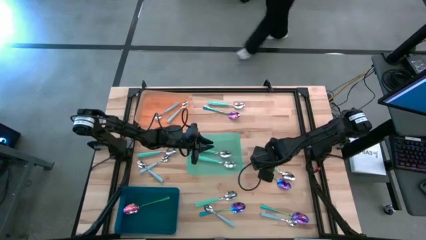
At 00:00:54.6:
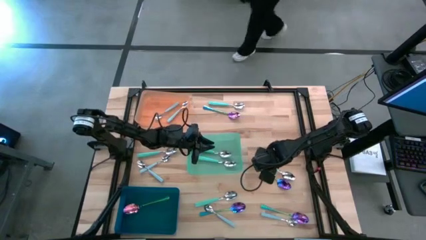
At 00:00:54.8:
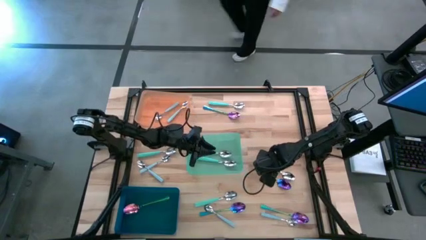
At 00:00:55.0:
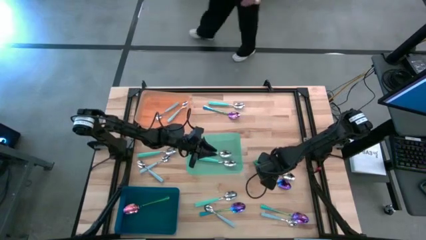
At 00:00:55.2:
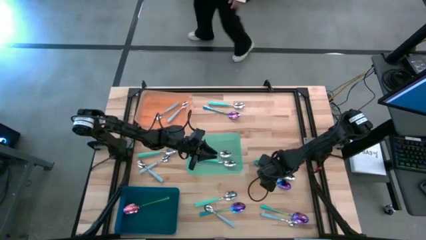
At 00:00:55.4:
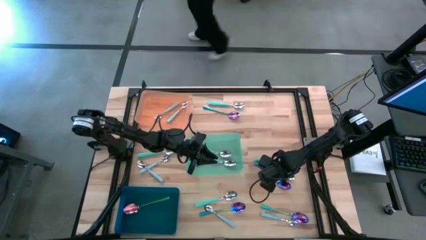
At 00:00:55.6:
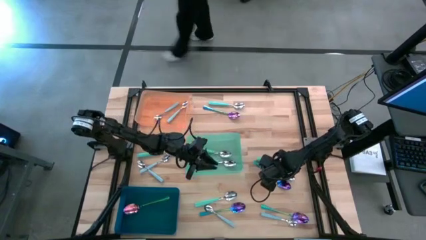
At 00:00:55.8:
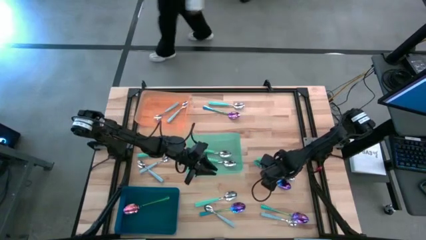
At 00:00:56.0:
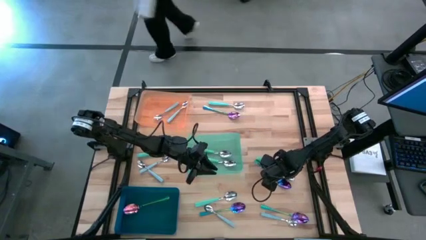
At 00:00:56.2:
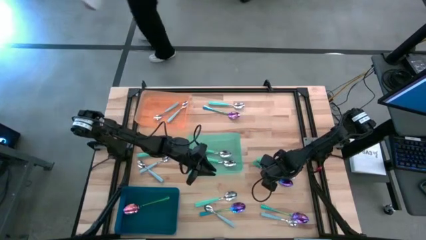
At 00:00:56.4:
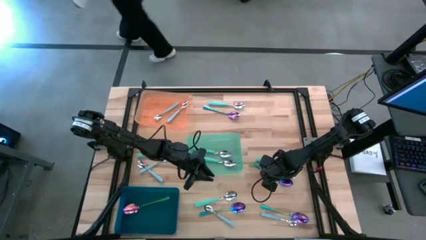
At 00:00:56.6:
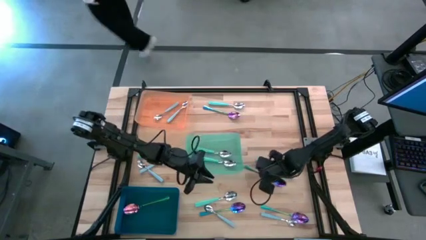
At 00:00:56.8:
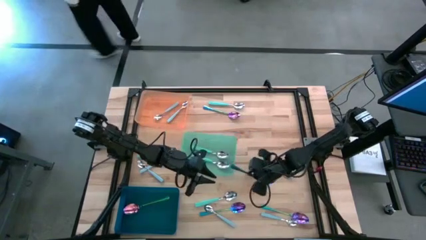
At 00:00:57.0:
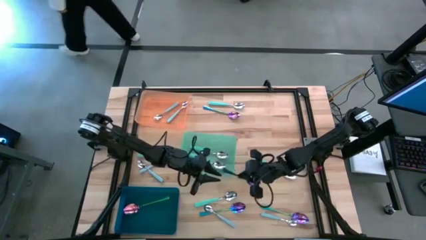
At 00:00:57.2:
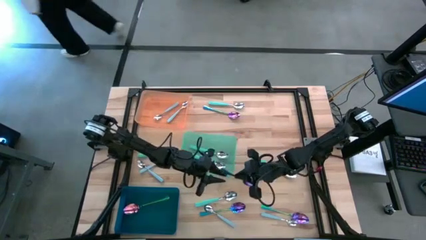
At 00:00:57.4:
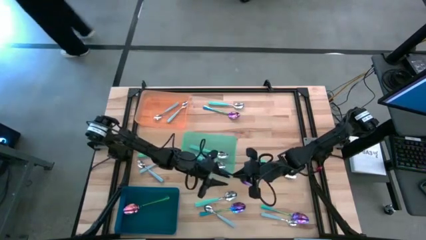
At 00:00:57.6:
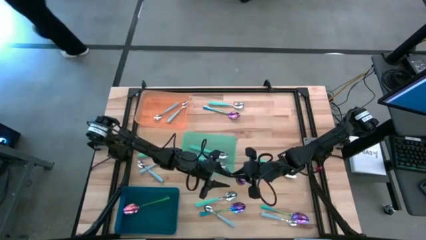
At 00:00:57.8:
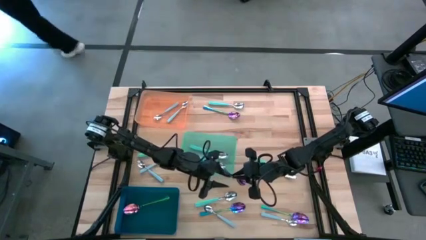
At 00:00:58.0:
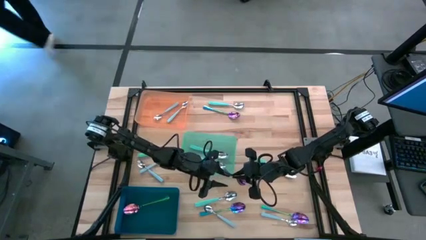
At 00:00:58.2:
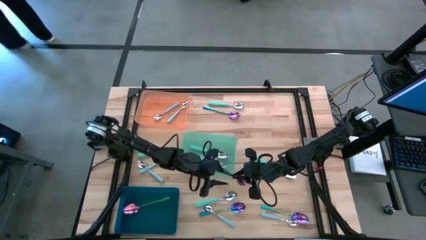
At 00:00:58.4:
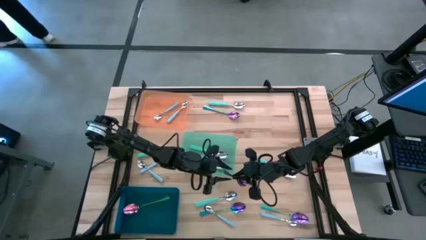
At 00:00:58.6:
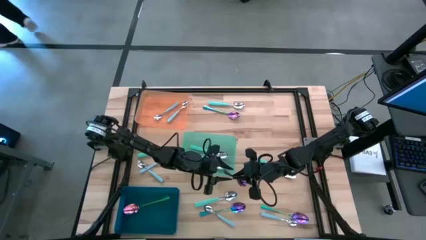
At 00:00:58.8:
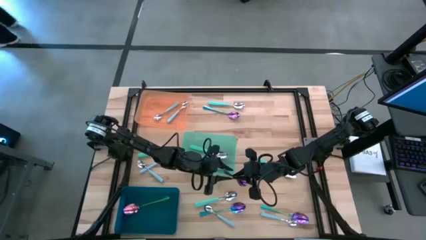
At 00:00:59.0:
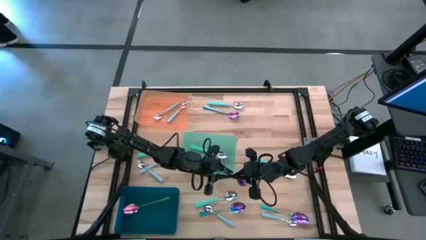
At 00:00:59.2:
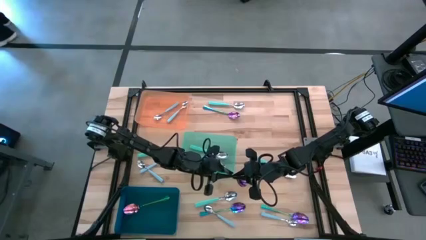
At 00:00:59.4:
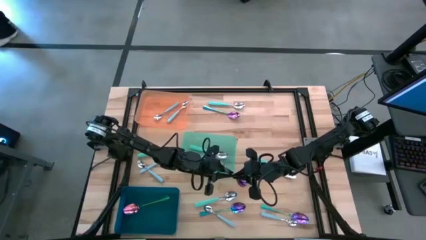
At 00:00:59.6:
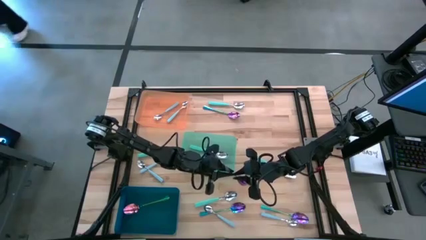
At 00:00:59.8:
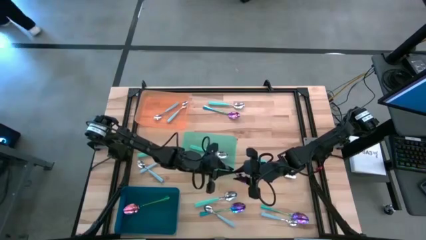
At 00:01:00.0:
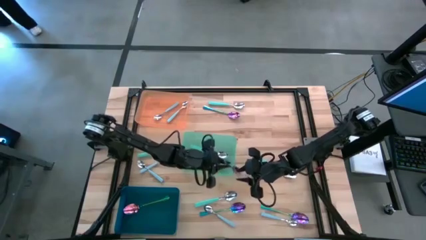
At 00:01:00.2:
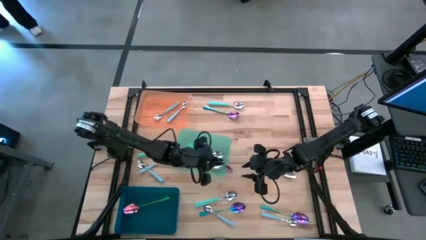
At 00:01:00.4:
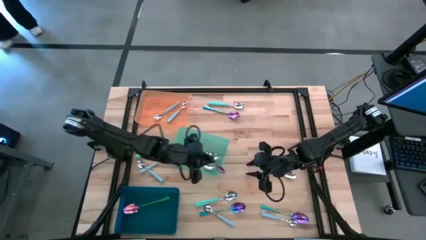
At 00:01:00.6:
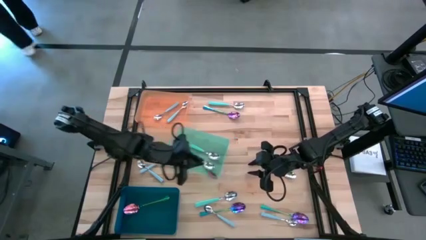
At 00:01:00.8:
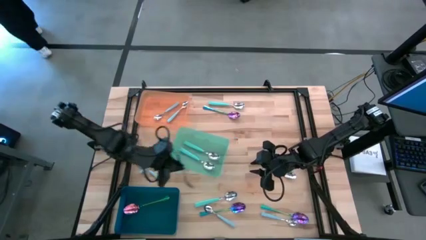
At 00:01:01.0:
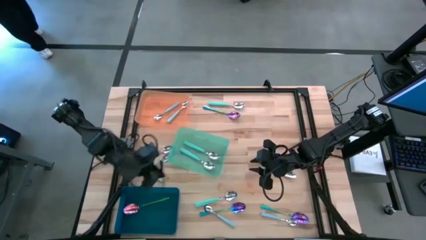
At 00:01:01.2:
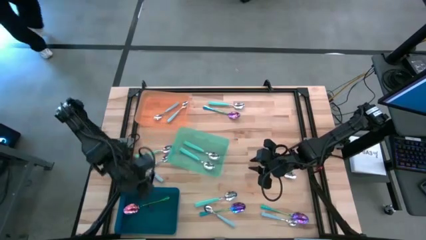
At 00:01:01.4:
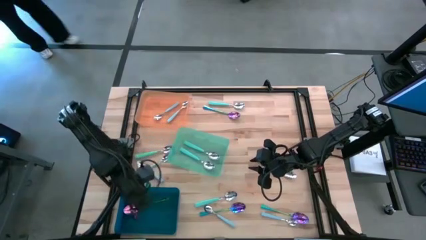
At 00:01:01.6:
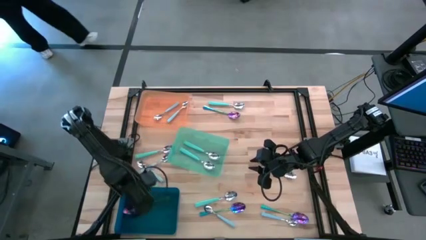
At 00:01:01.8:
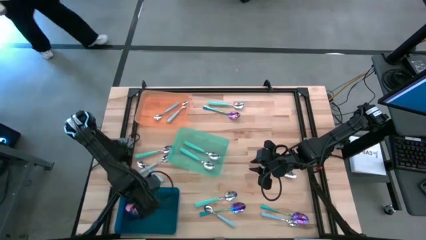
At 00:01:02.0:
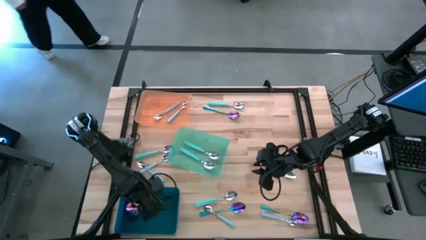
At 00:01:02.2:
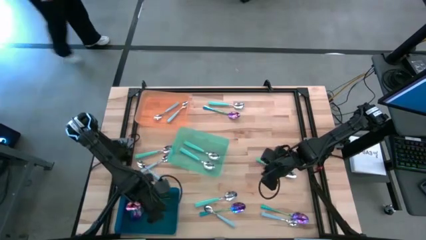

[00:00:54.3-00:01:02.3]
Task: Sort silverware by color (type)
Put the iridescent spoon into the blue bin

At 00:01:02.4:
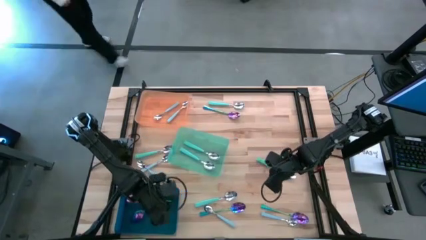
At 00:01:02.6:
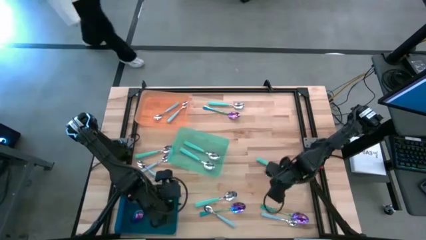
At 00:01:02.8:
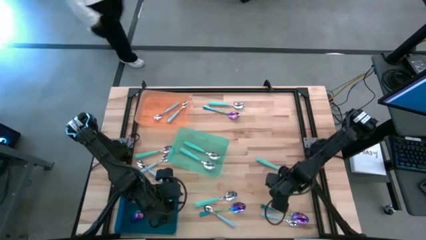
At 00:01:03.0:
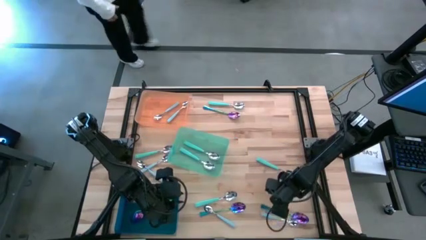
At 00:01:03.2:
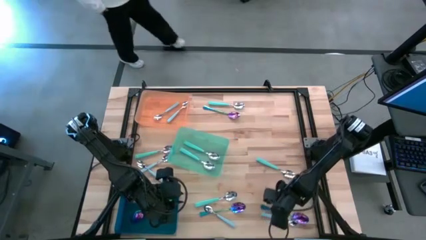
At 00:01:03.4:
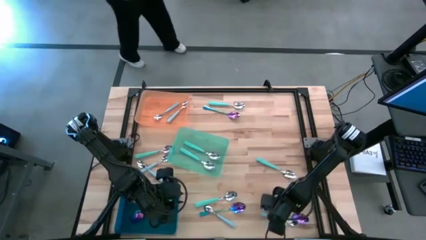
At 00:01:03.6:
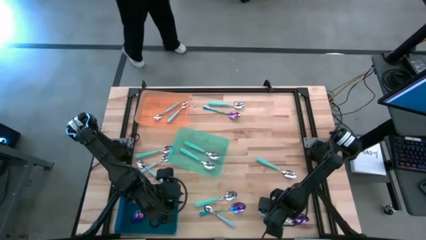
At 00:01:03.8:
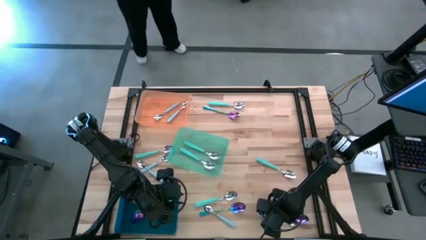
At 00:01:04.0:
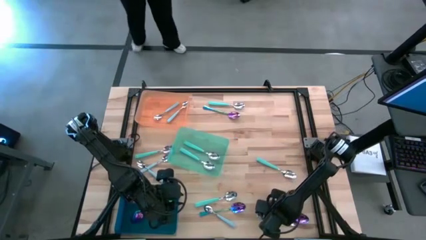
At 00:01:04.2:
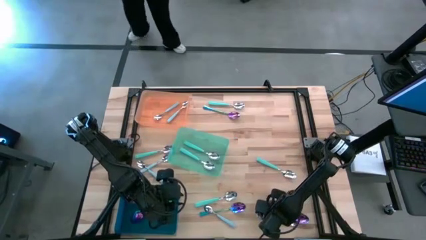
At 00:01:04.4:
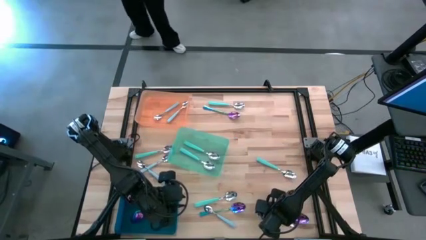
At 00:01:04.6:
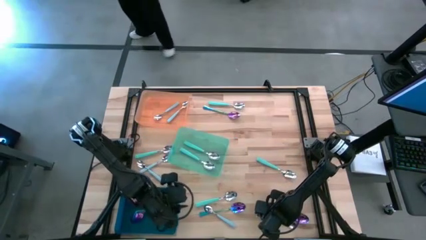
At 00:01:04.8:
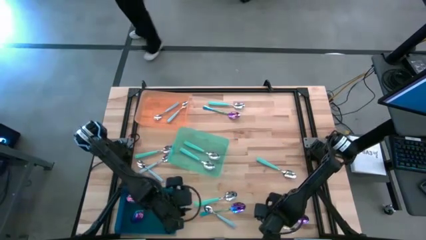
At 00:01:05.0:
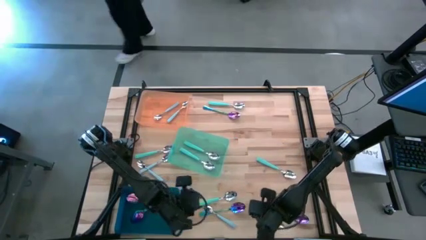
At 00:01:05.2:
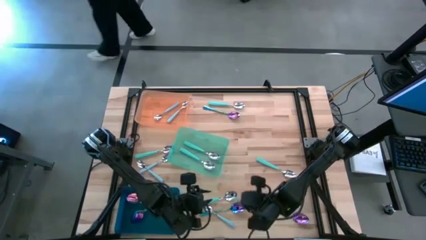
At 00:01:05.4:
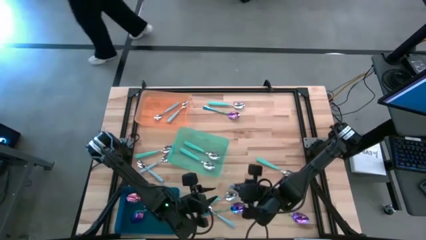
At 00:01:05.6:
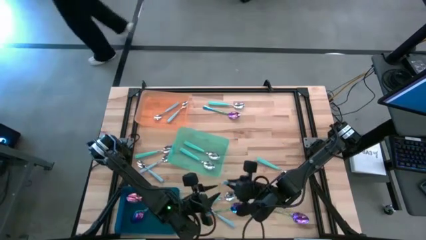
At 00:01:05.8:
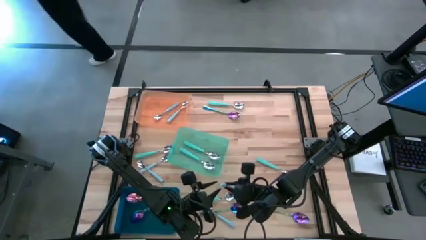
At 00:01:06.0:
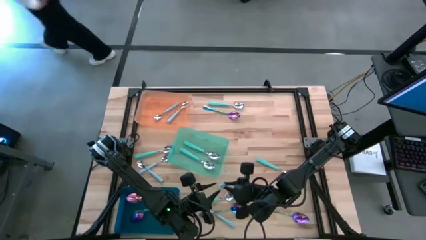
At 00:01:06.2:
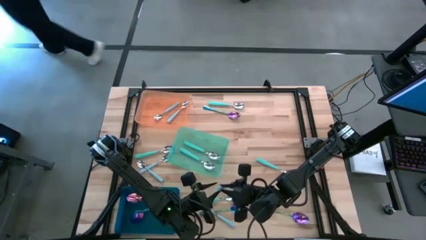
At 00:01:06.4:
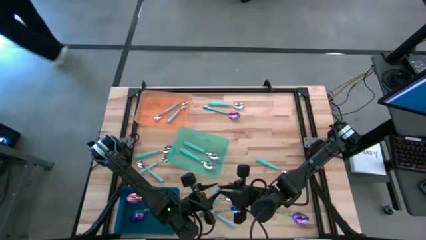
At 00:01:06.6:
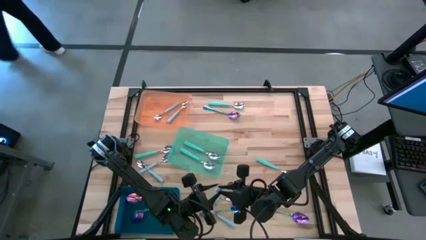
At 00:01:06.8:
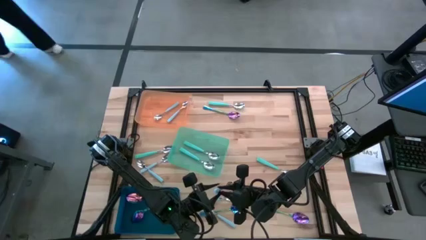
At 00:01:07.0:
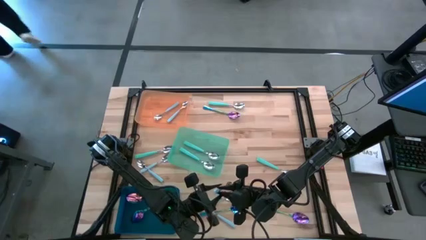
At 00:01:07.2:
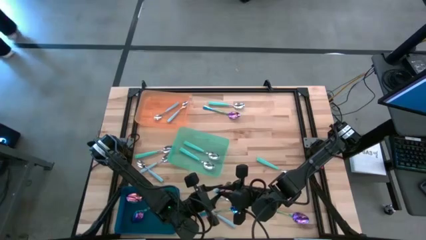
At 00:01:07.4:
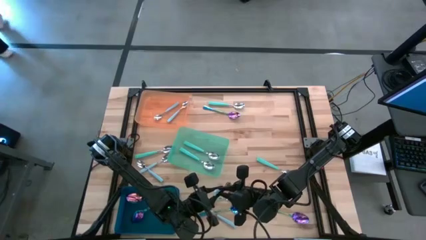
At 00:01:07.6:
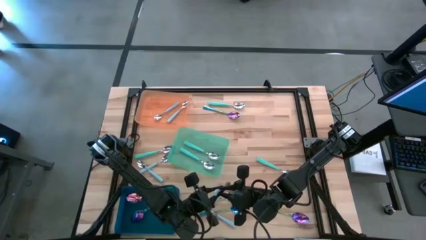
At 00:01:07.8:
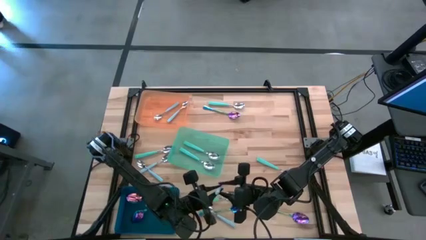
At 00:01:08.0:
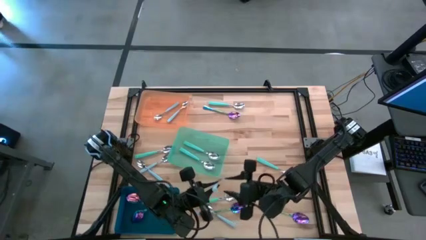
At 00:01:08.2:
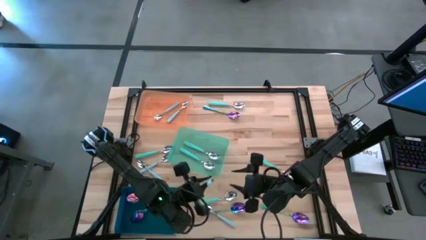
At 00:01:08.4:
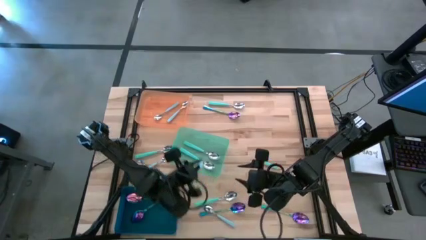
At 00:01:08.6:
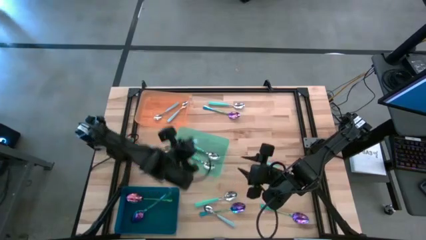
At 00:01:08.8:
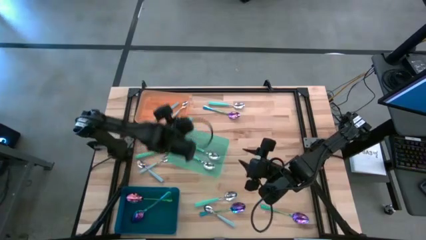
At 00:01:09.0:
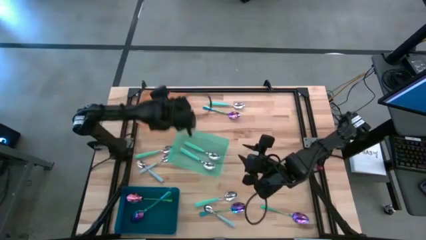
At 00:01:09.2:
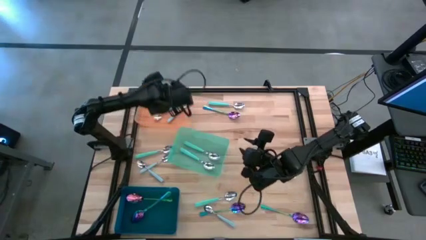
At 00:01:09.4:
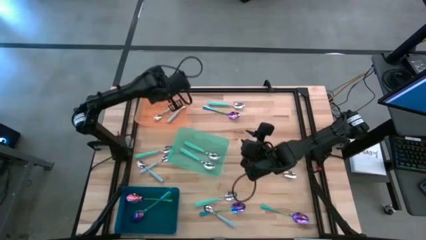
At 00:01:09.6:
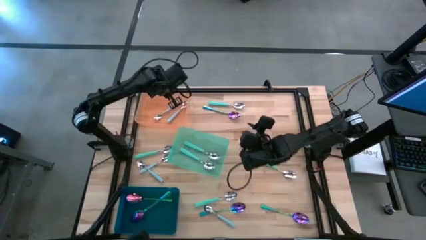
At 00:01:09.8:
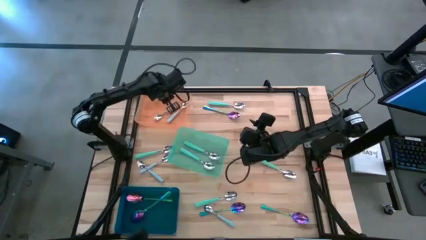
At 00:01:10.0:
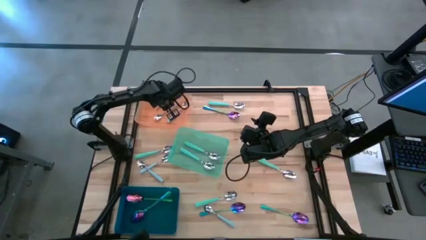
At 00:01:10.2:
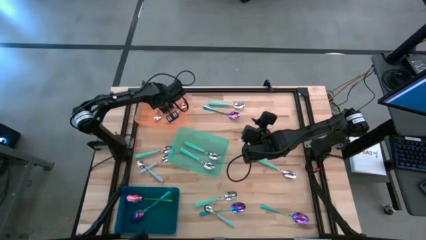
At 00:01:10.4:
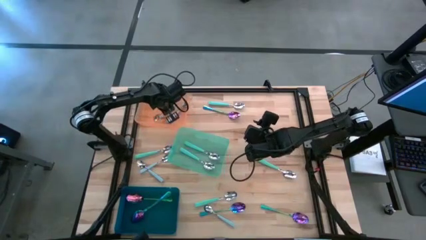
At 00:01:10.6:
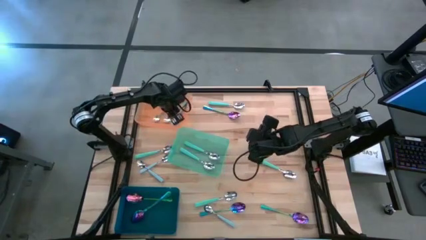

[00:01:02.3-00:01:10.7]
Put the blue spoon into the orange bin
